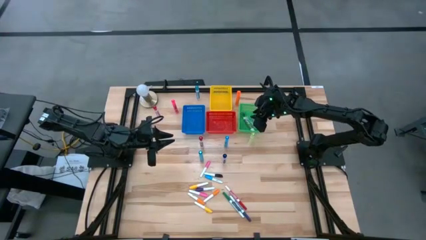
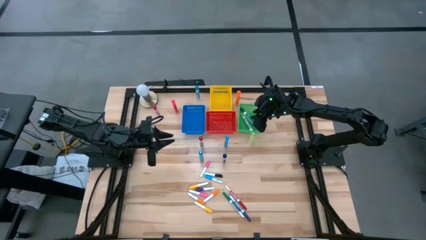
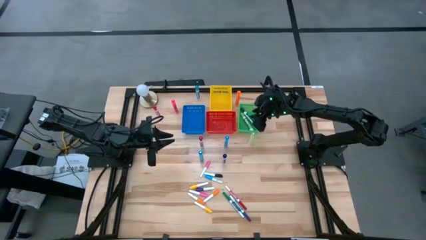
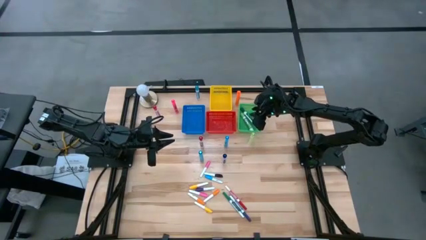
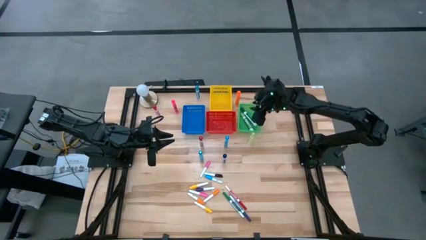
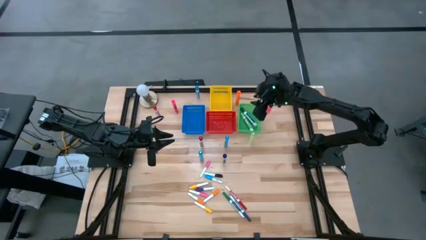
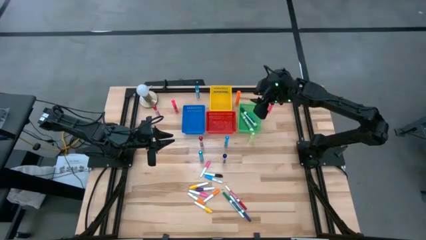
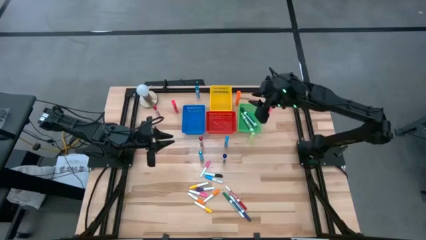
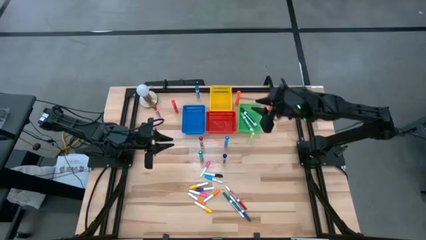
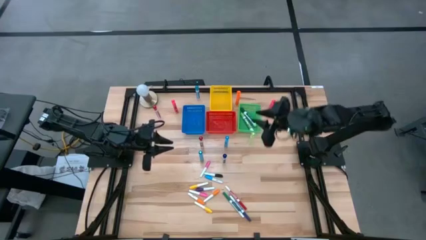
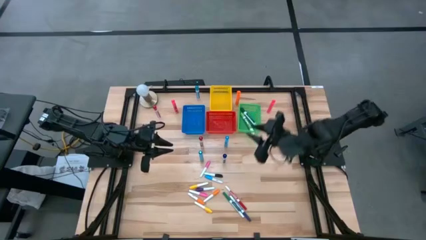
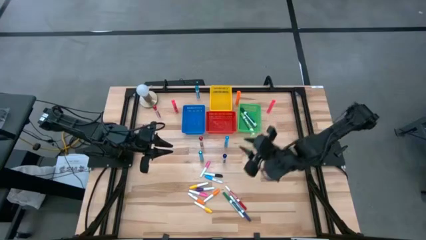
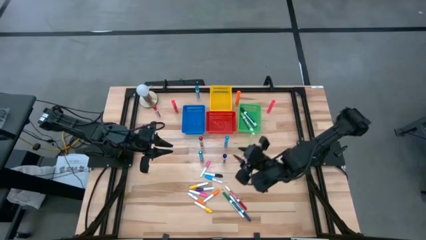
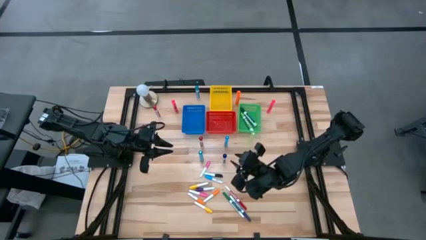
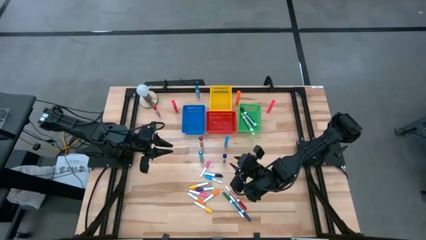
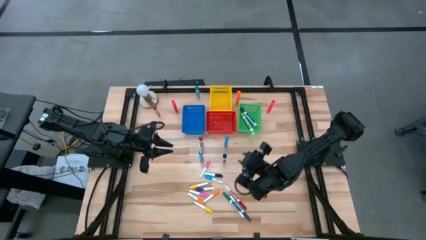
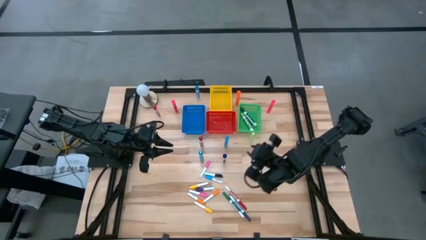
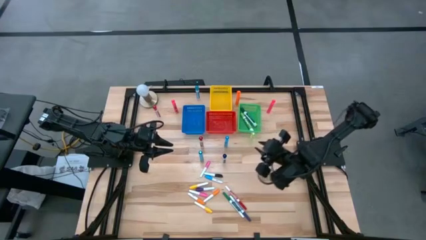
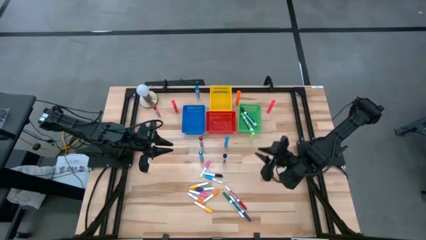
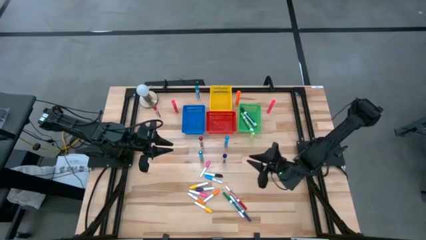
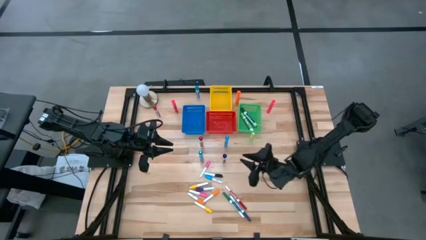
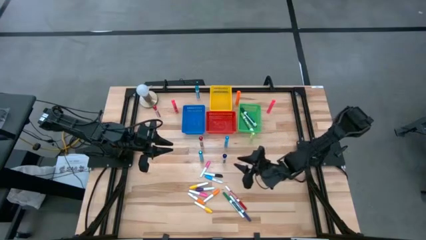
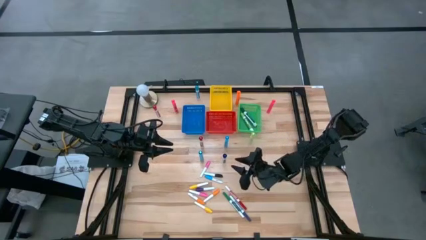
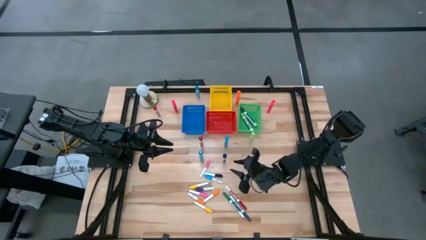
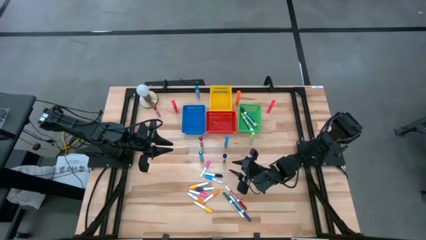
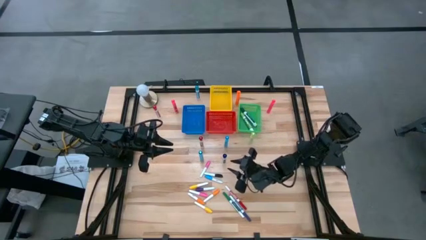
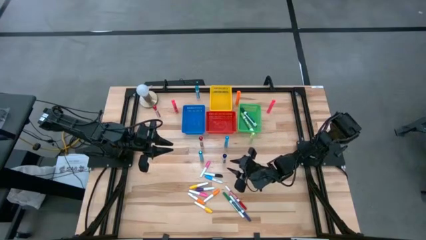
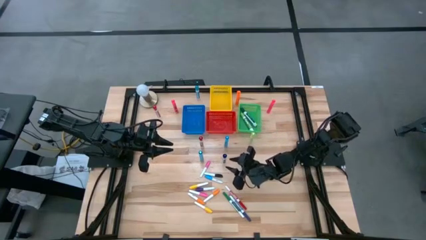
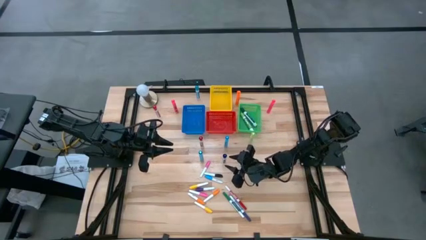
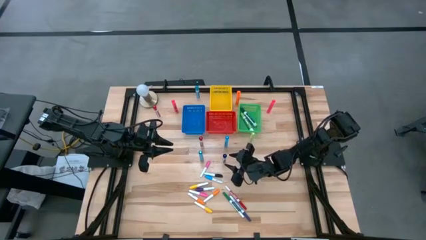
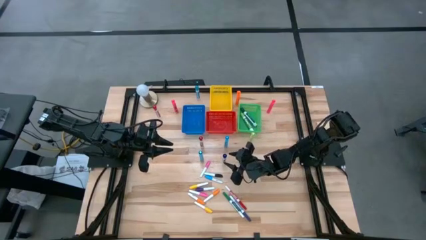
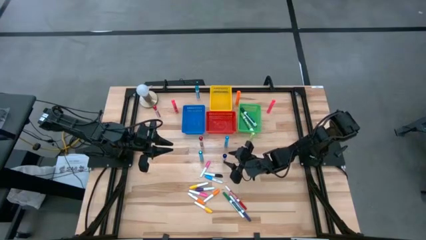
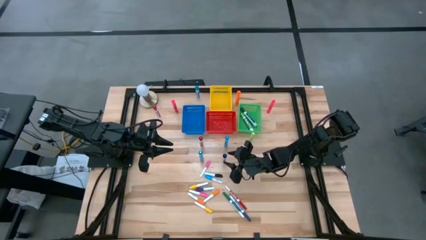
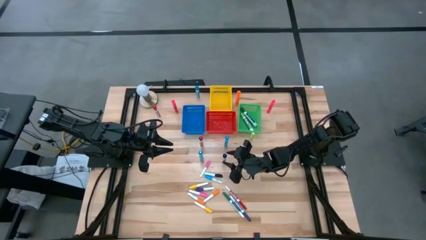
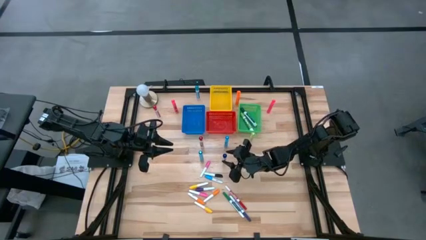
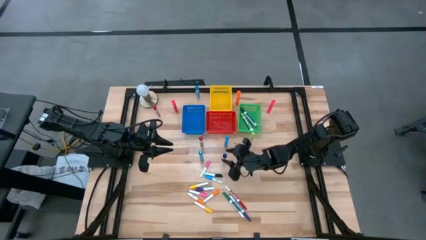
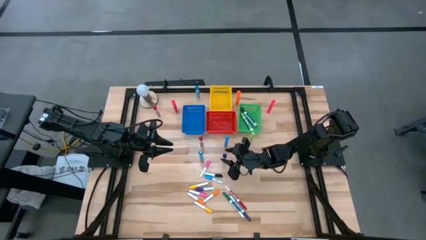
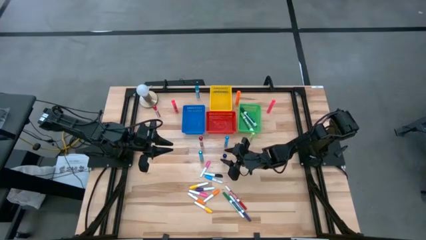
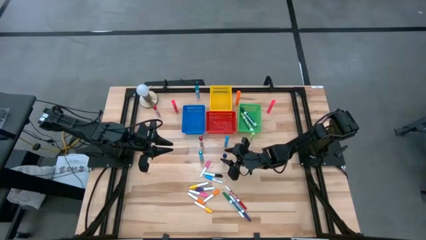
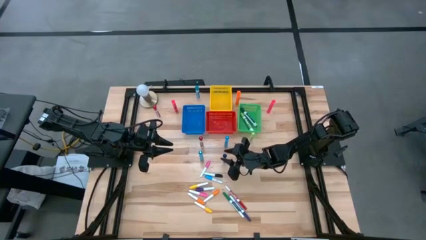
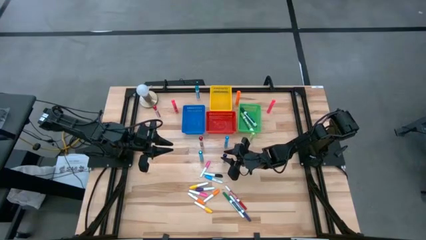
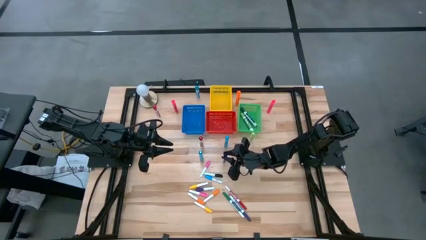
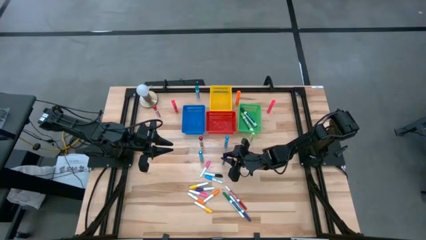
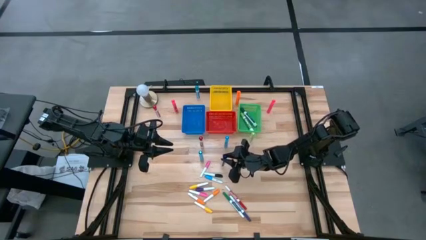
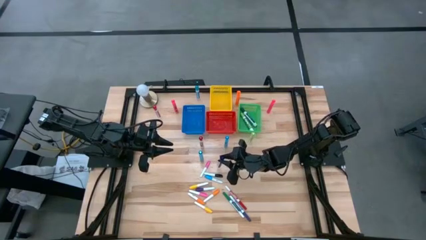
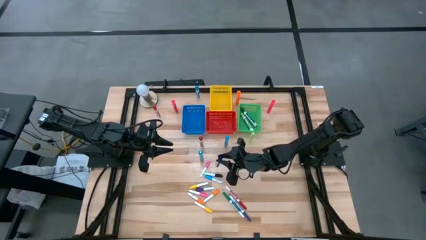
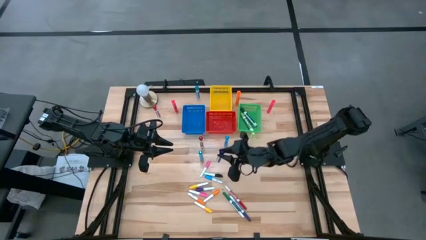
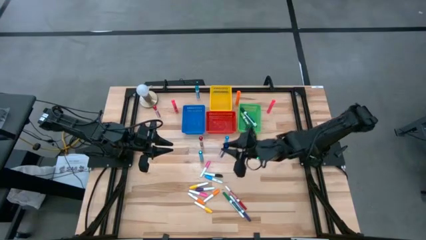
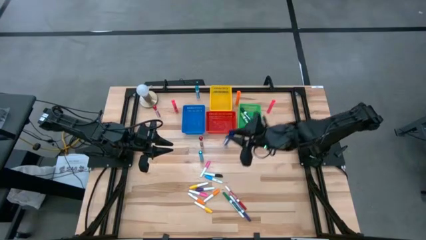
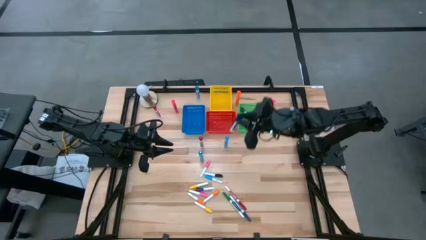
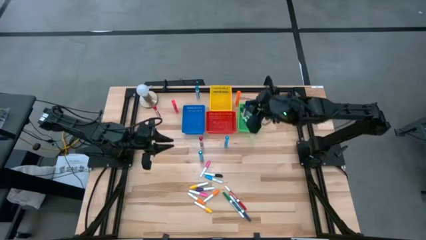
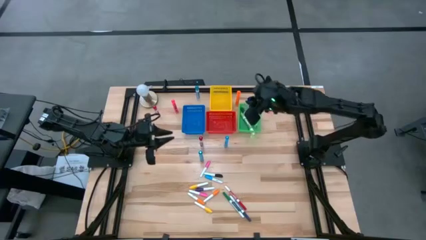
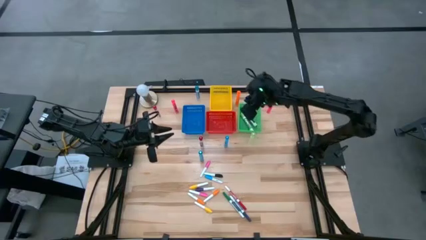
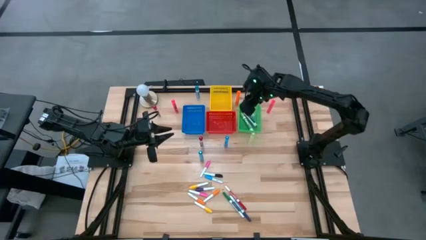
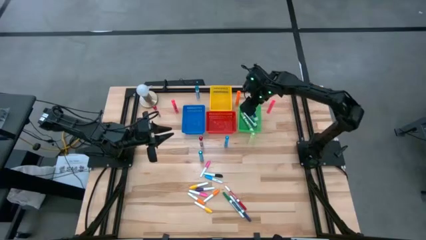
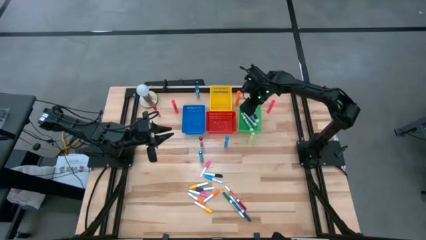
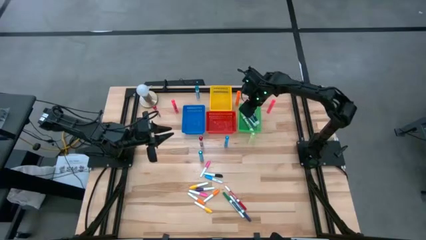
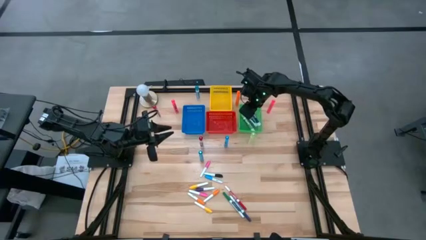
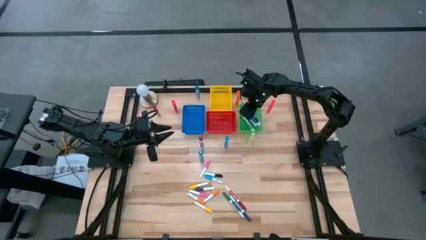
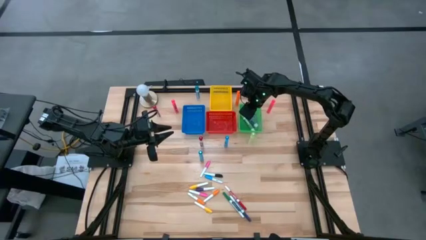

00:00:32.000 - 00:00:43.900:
Task: Pick & Place Markers
Put the large dark blue marker pen into the green bin
